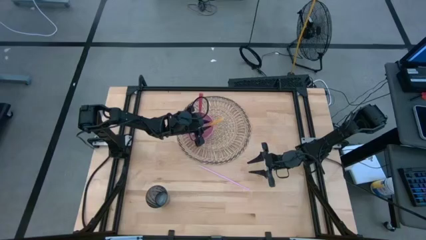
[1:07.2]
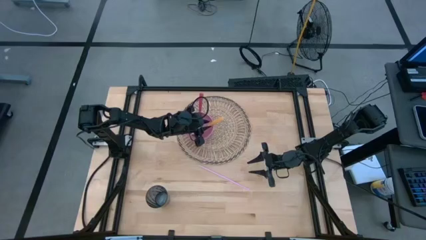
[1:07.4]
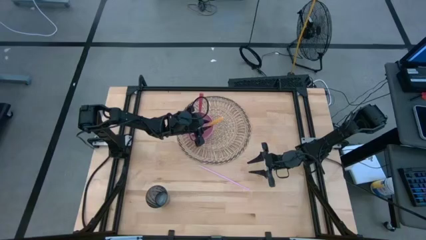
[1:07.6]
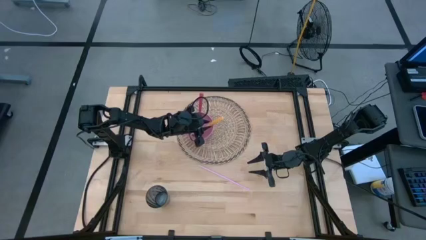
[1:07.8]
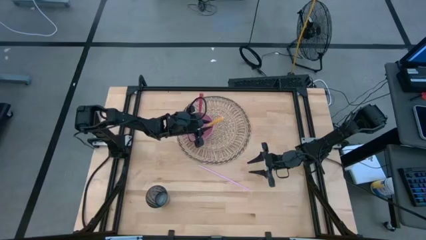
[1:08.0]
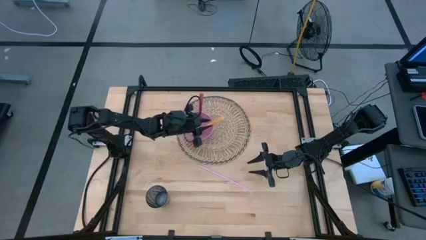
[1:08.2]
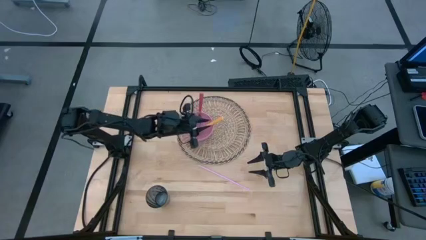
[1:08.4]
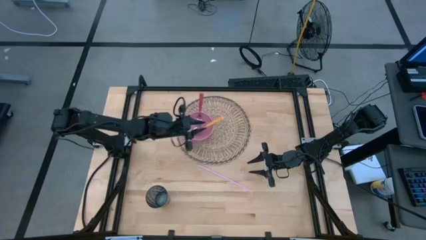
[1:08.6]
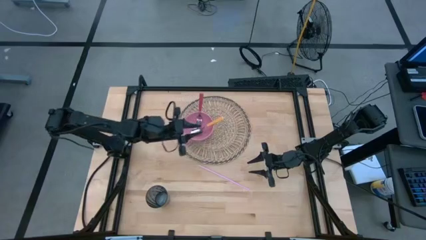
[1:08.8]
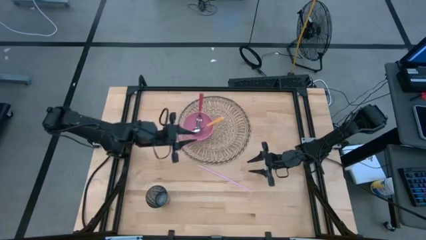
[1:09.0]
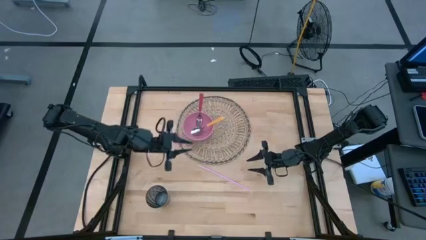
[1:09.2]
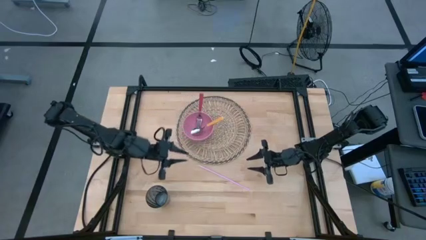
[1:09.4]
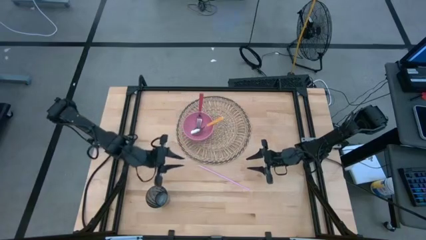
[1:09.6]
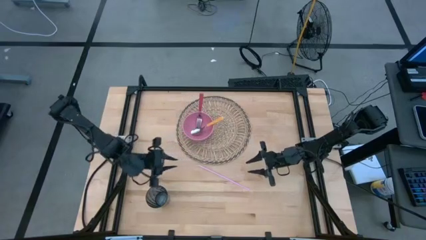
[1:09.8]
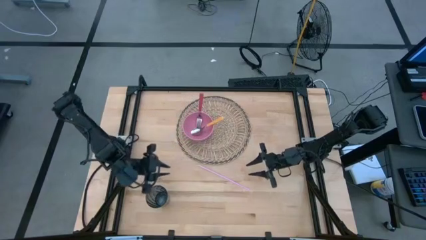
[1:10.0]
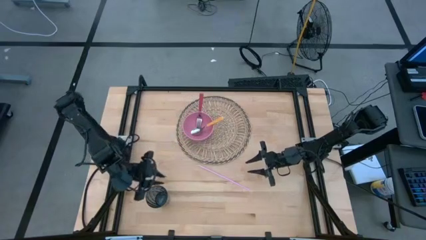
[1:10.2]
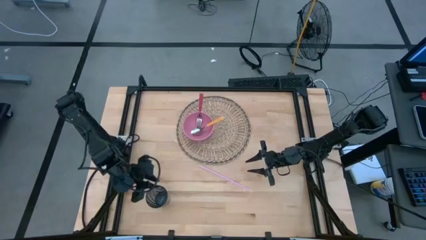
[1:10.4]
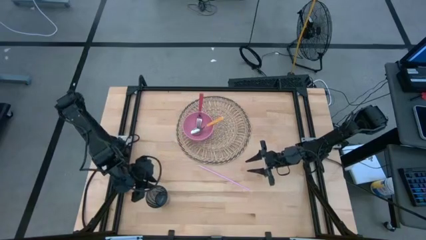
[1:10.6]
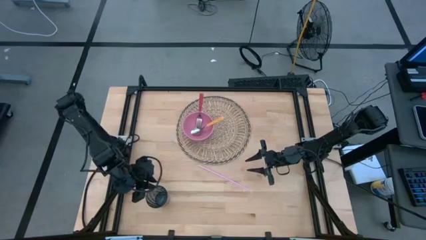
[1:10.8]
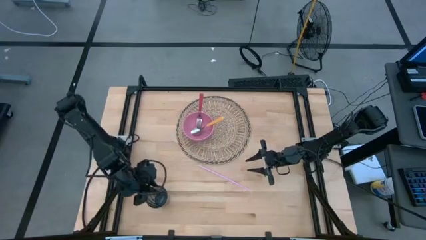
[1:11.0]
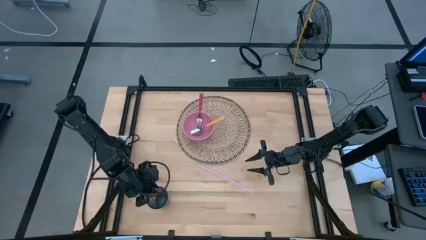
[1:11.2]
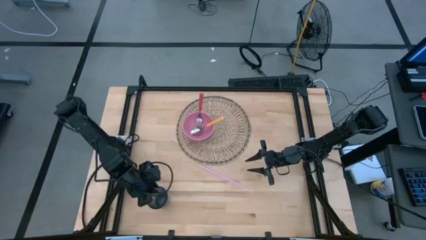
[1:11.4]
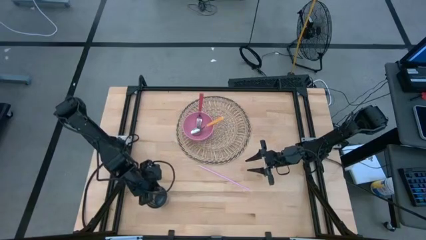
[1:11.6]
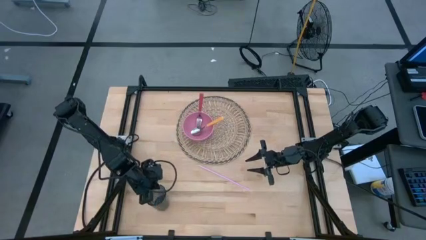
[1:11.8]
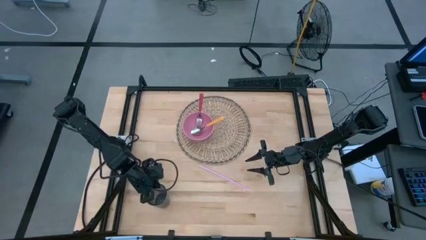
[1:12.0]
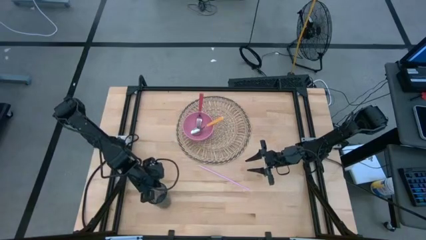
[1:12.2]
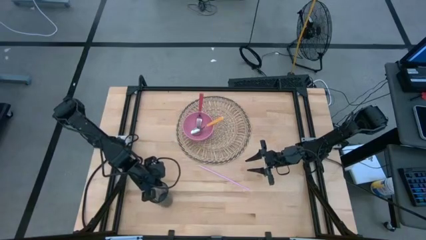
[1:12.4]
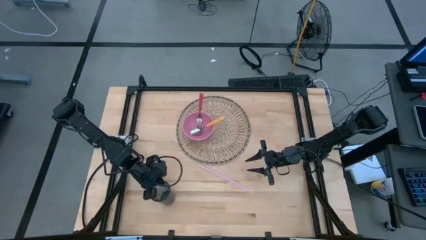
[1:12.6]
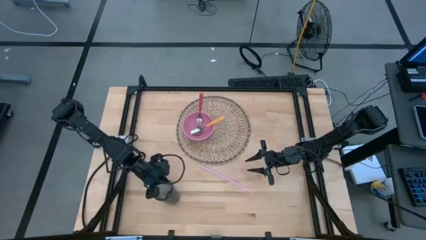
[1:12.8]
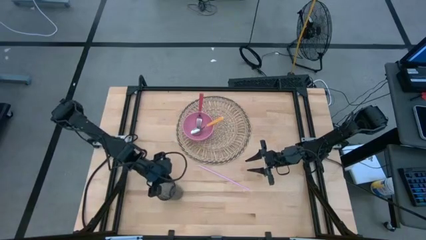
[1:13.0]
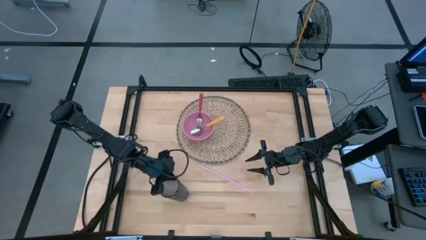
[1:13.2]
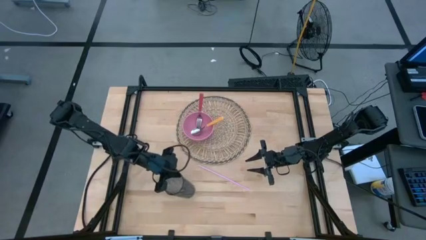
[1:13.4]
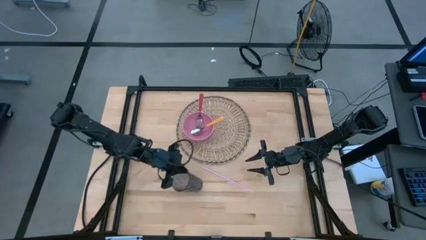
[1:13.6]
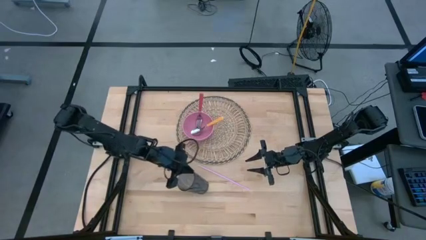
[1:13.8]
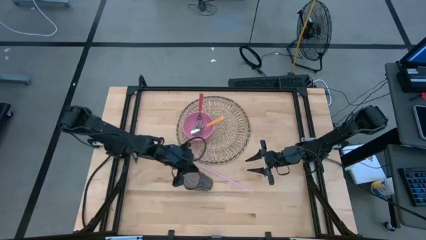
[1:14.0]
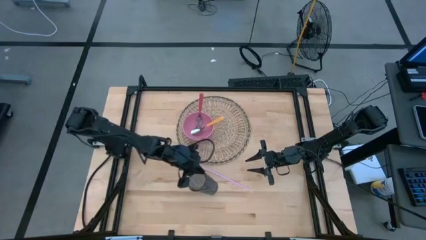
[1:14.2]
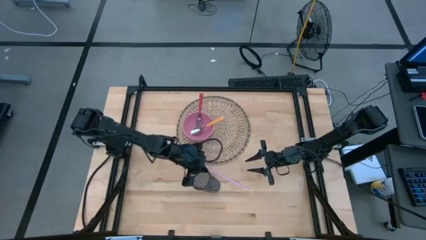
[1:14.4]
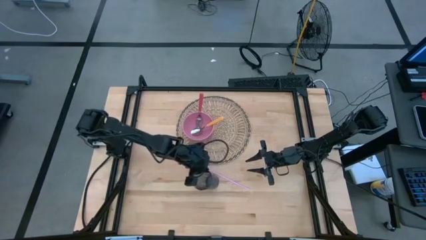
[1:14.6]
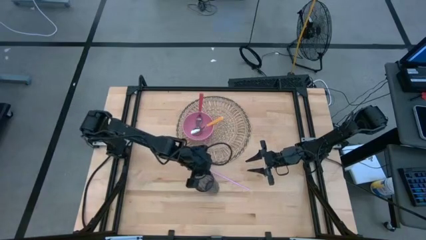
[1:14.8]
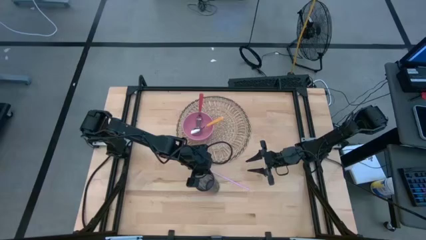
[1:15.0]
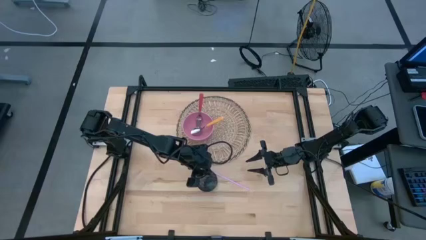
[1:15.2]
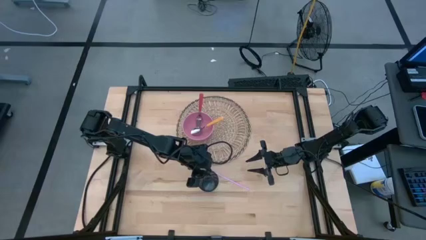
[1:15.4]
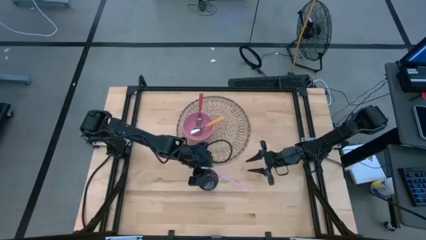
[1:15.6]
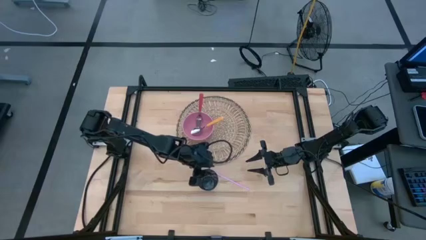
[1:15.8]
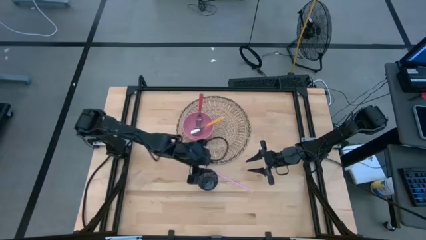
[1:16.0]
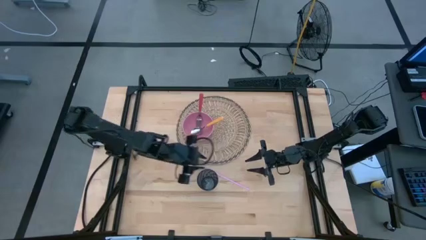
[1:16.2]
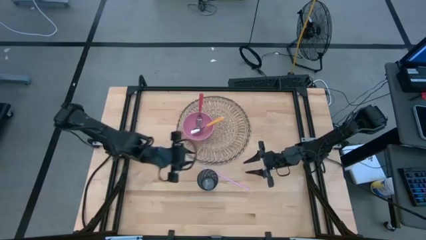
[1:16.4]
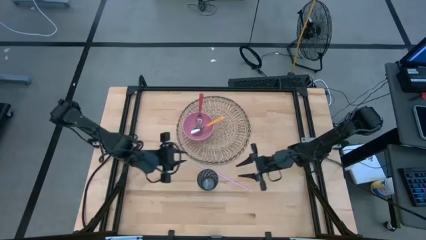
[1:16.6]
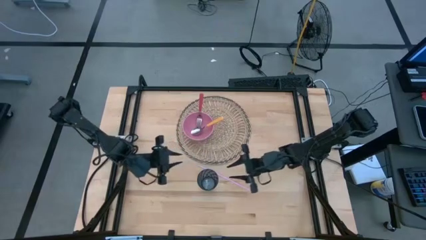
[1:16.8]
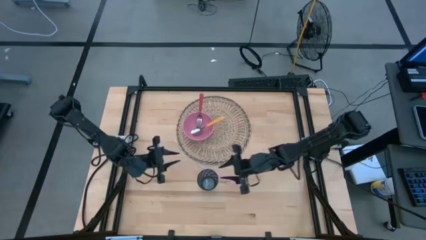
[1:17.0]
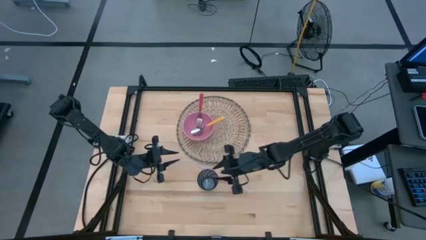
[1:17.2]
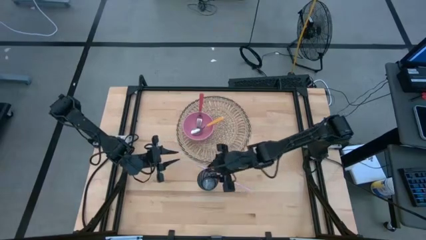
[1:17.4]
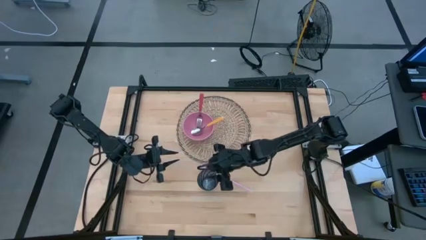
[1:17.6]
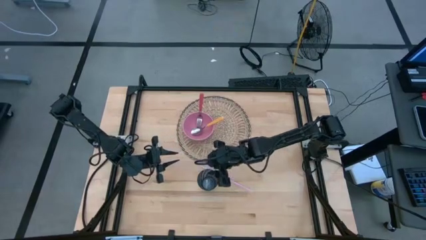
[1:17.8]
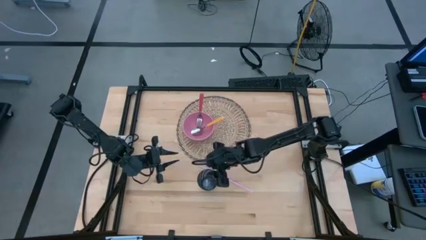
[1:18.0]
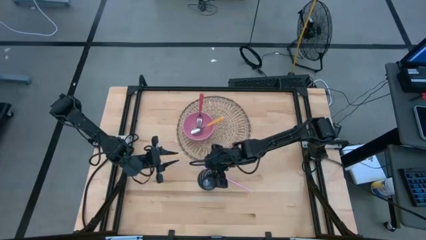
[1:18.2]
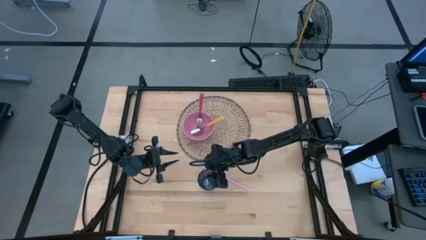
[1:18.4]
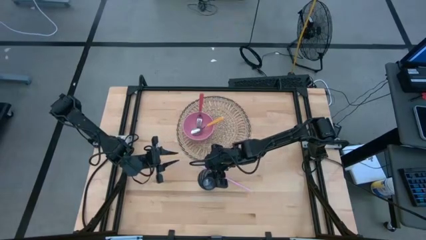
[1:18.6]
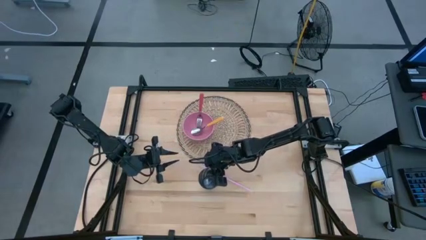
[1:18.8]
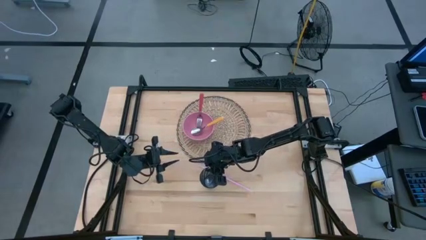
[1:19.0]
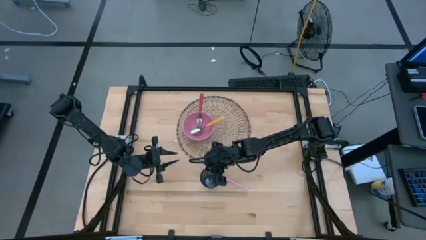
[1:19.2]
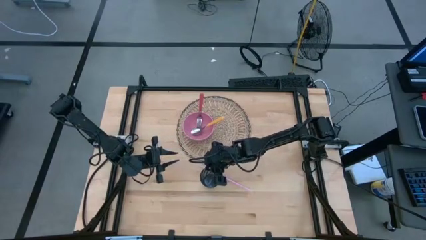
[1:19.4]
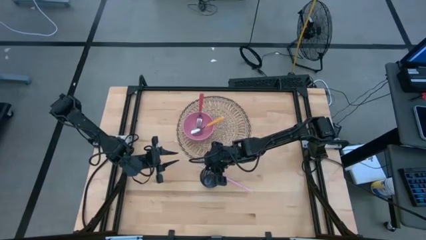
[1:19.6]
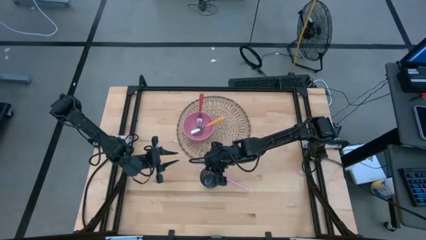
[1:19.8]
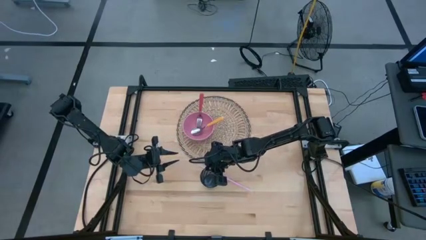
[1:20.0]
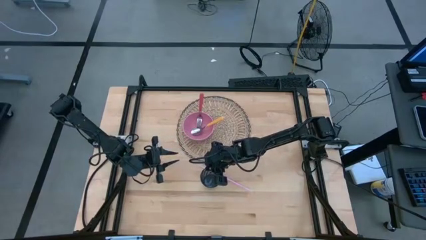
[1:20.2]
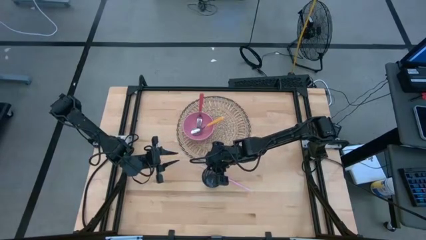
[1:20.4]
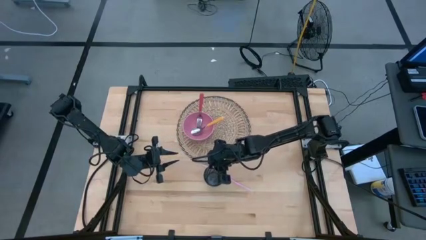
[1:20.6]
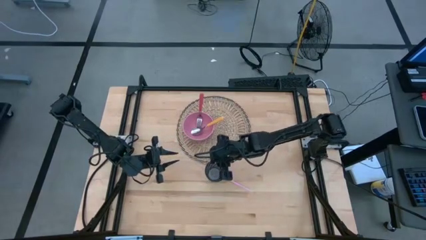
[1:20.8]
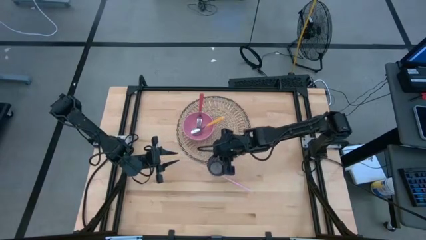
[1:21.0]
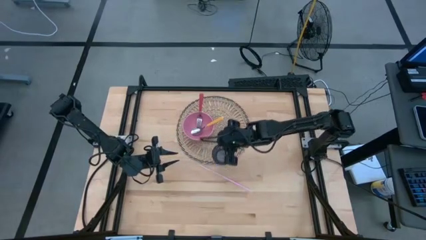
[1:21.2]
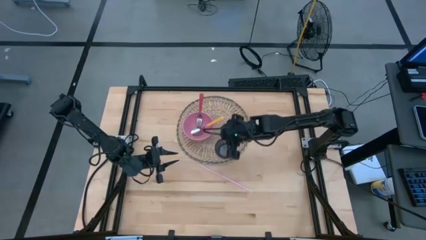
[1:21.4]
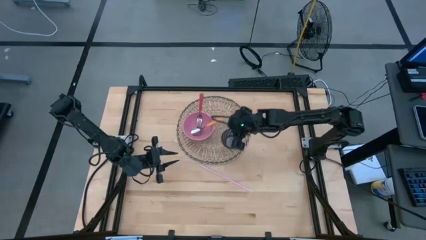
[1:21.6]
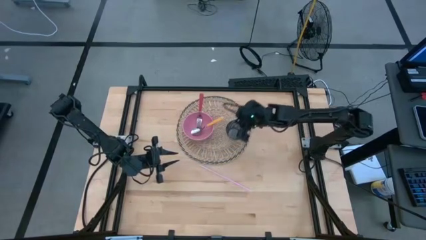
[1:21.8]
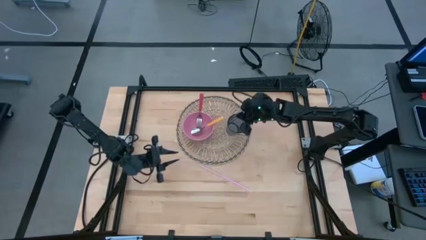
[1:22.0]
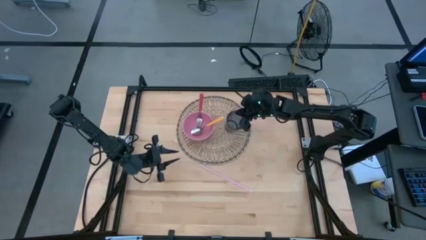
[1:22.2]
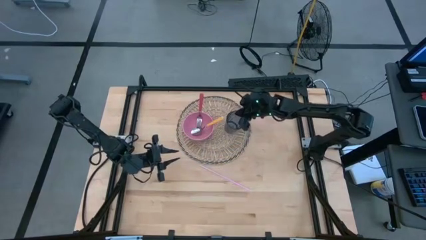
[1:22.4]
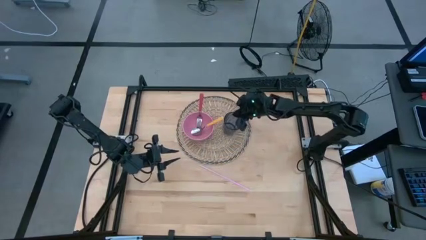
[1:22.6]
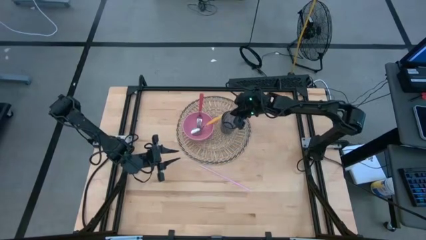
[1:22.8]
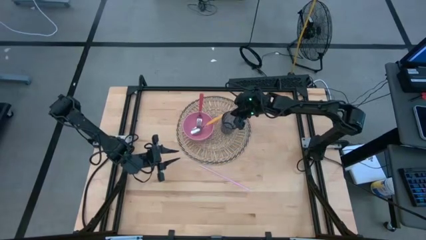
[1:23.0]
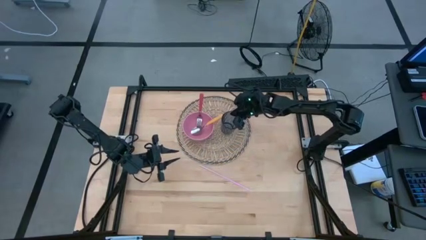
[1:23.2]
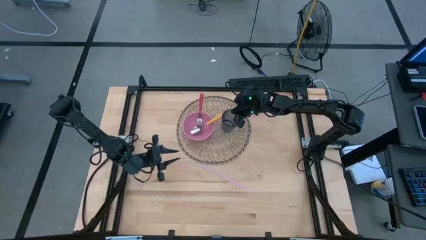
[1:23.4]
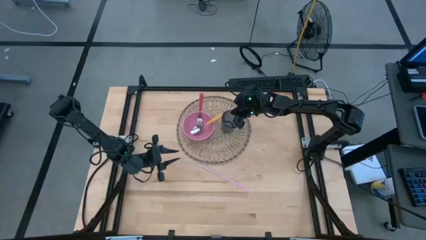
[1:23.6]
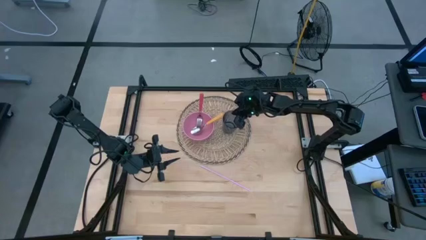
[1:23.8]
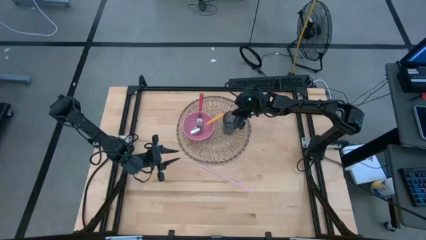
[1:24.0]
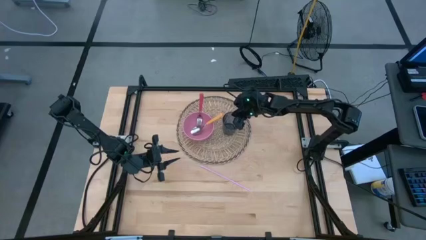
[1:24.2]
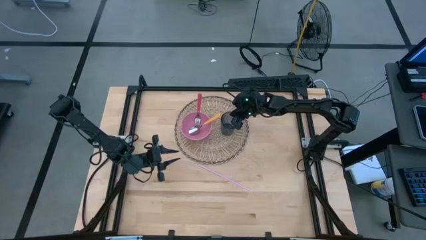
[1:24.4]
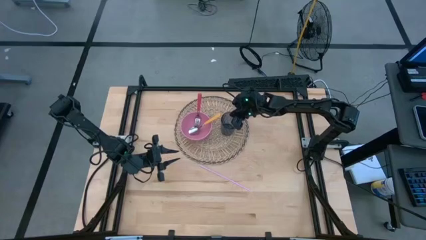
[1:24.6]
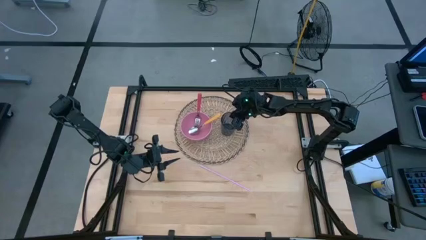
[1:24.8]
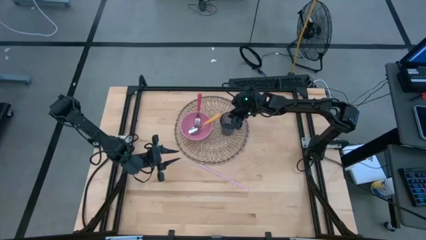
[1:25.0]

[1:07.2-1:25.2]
Task: Pick & Place Utensil
Put the blue cup on the brown placemat to the right of the pink bowl on the brown placemat
